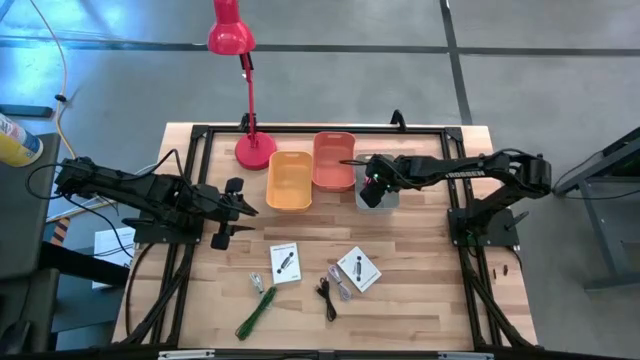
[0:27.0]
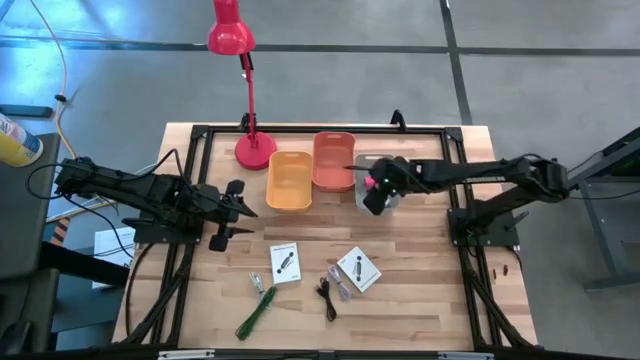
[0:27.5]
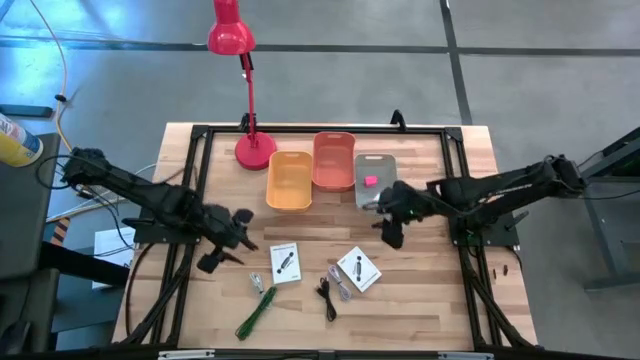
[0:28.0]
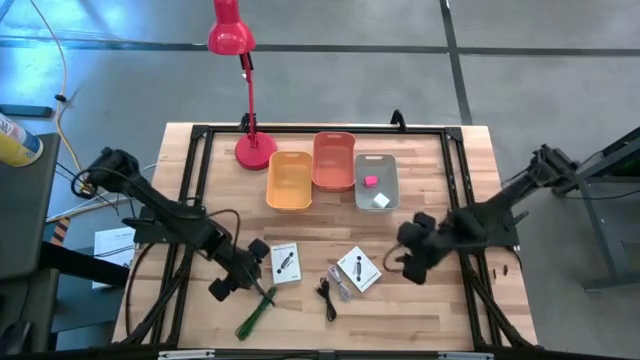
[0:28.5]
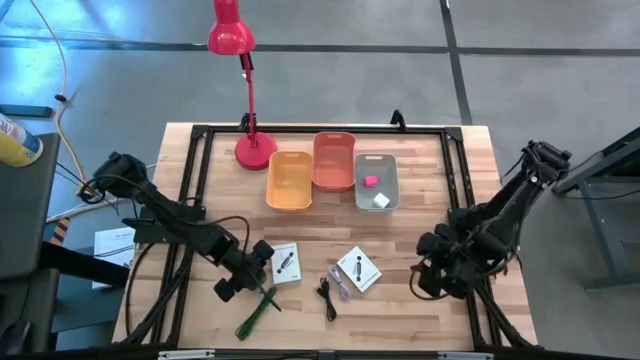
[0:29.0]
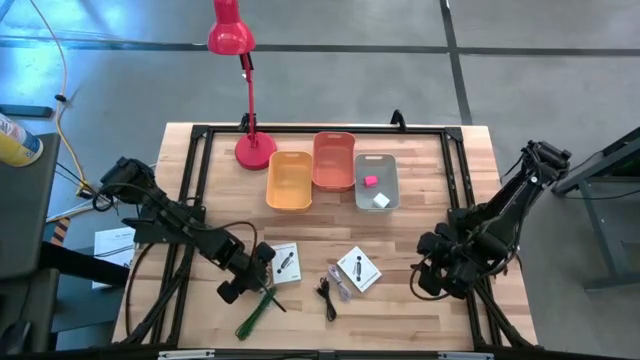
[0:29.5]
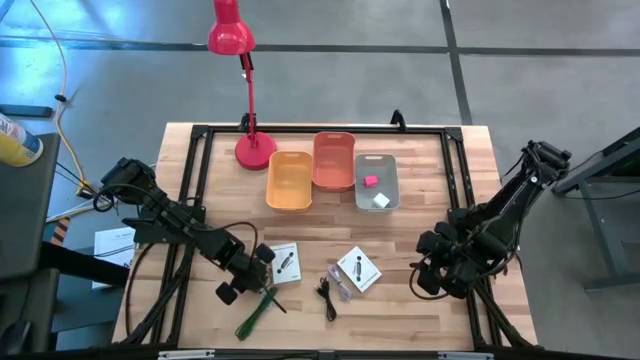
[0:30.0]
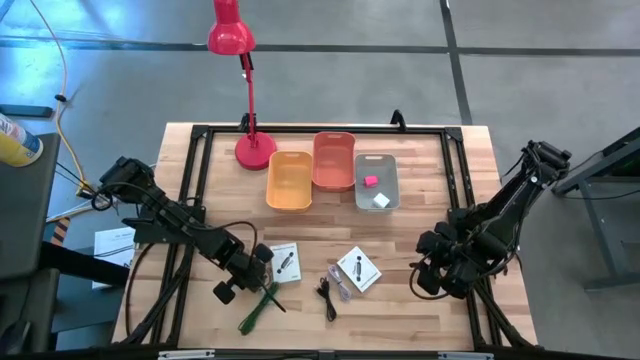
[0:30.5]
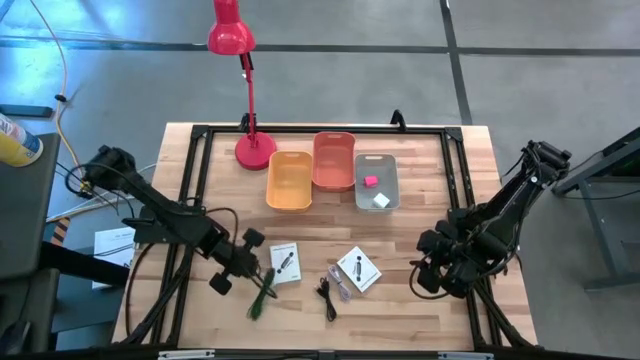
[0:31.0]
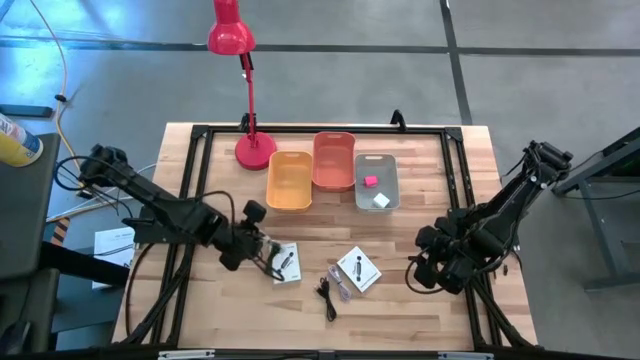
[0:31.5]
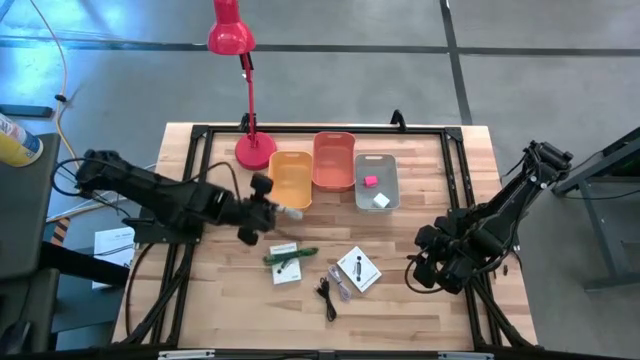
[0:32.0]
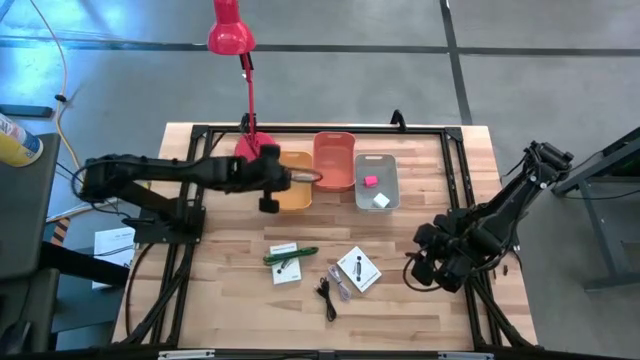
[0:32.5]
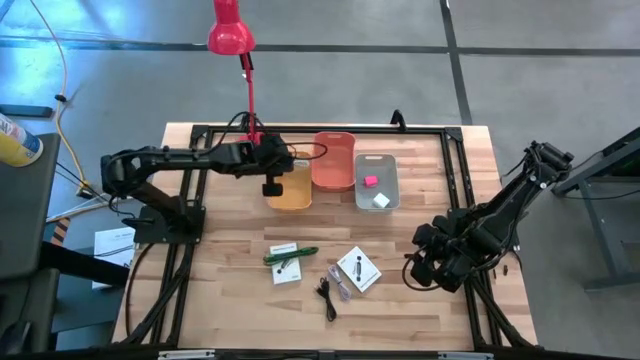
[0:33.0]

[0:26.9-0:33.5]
Task: Pick and place items into bin
Put the white charger cable into the yellow bin

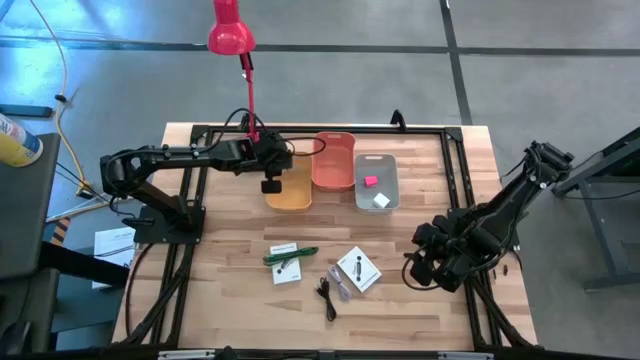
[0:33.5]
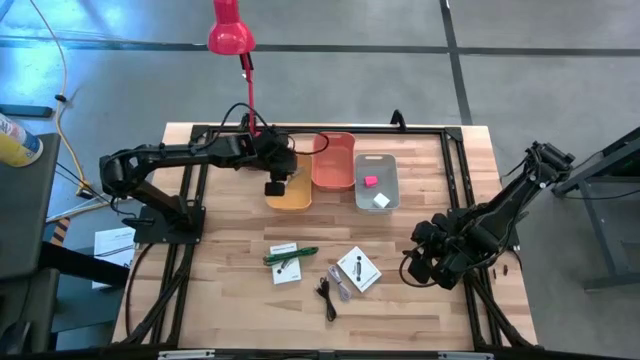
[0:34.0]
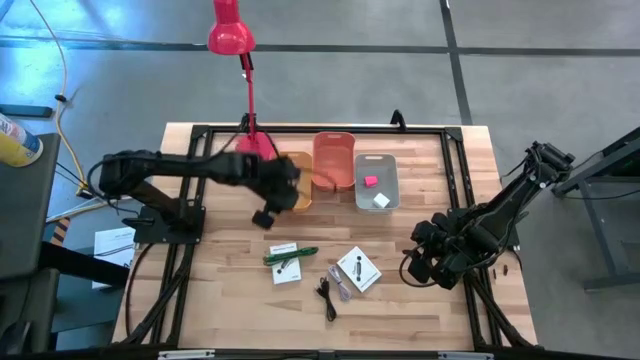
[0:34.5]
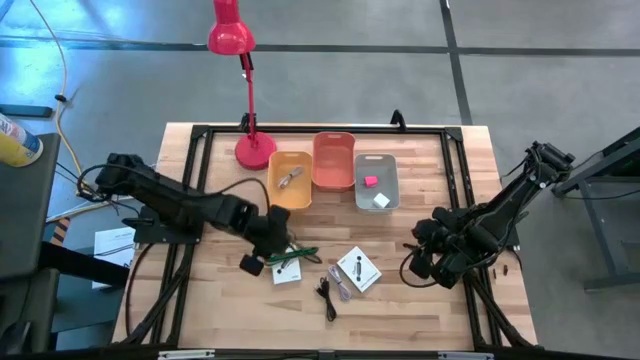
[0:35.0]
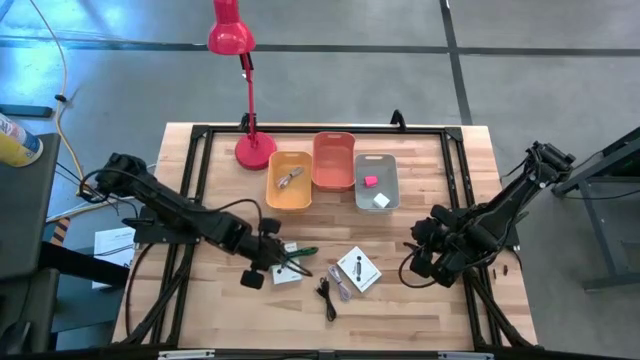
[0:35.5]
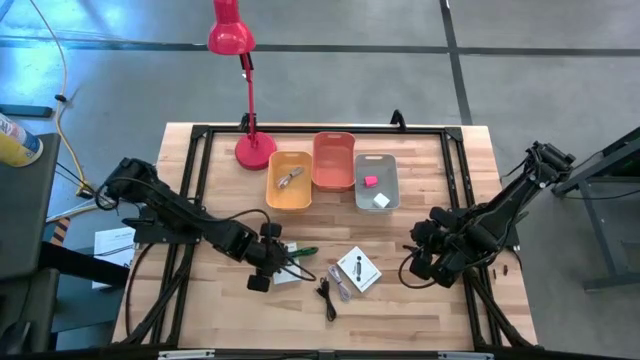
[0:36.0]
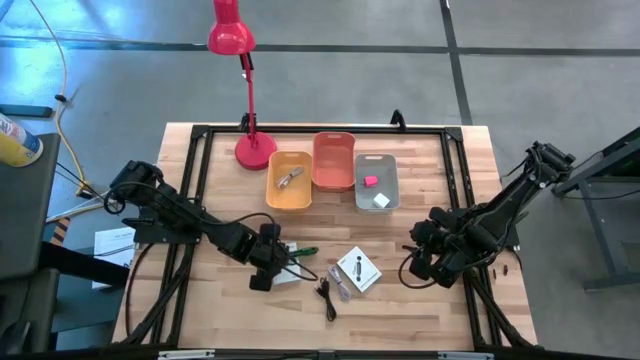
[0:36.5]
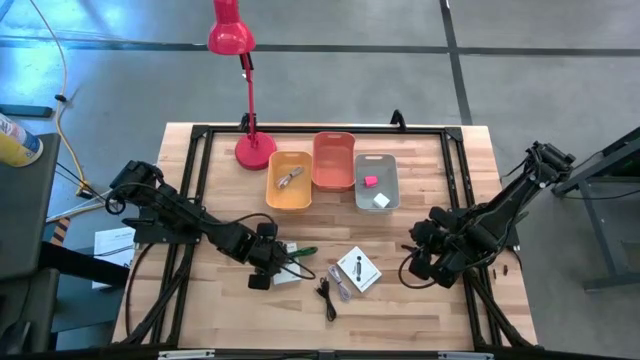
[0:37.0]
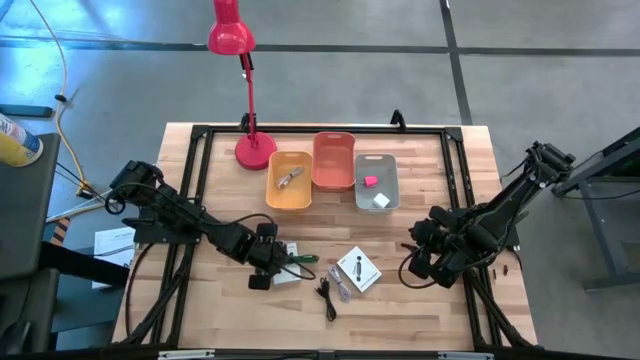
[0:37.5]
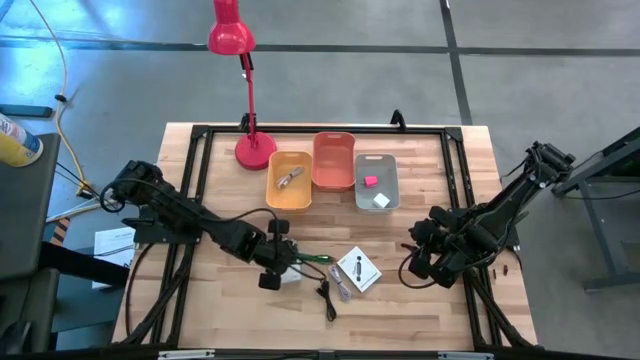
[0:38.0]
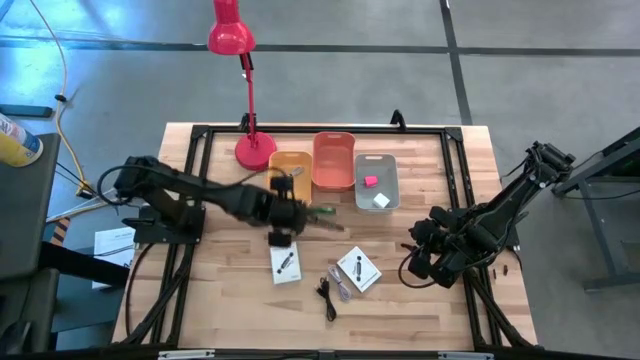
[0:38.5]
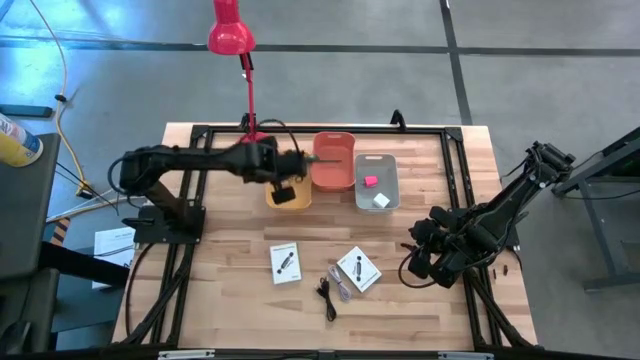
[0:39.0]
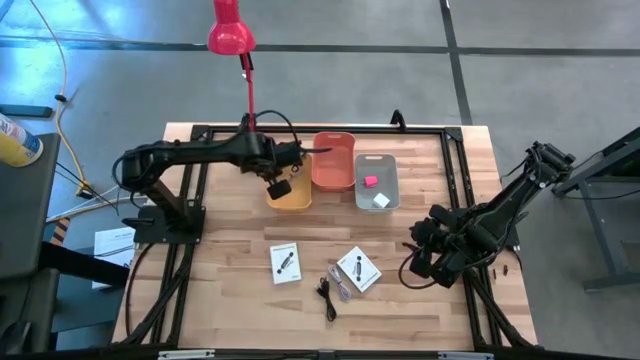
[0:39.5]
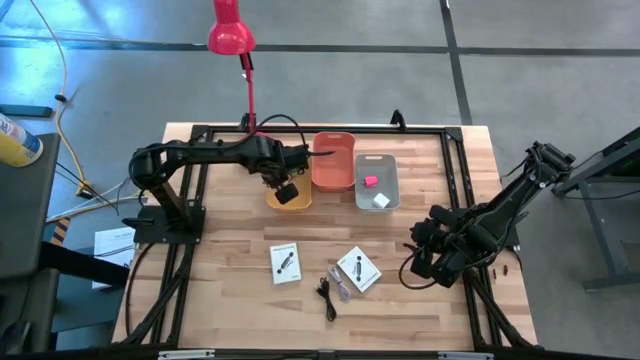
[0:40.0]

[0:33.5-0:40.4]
Put the green charger cable into the yellow bin

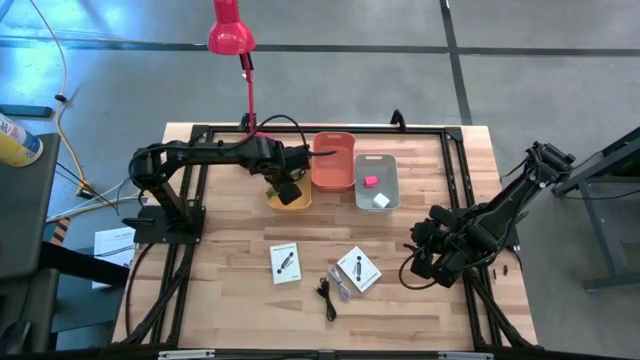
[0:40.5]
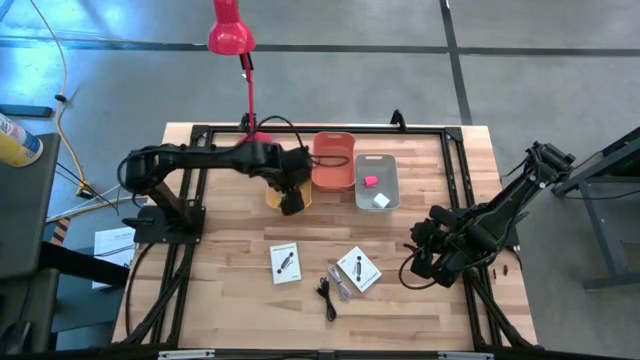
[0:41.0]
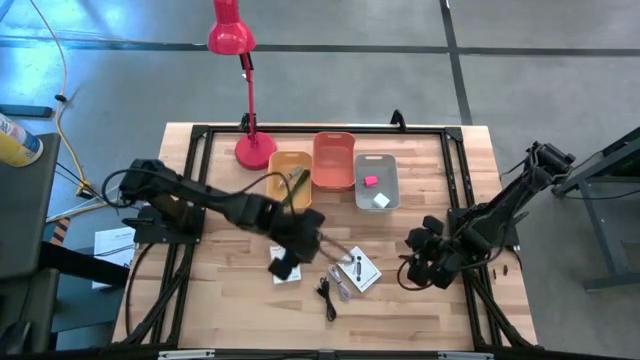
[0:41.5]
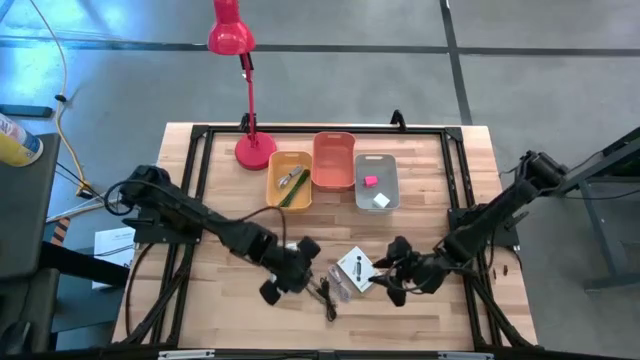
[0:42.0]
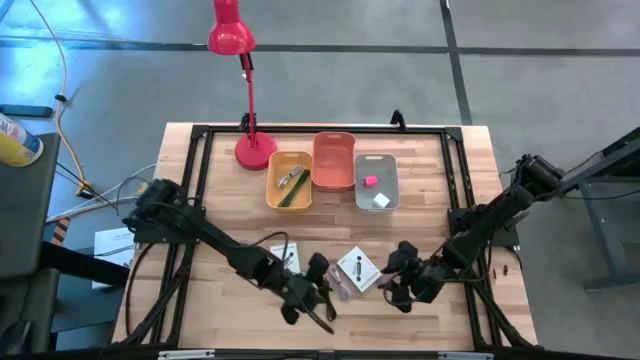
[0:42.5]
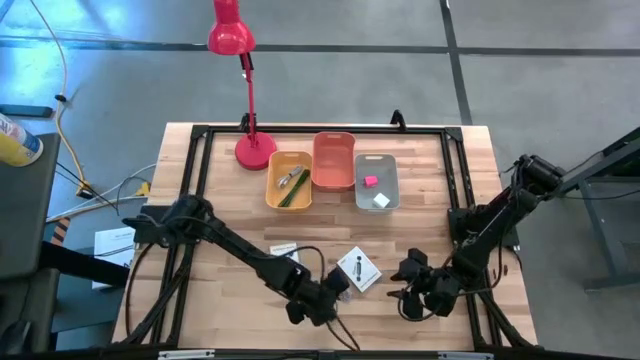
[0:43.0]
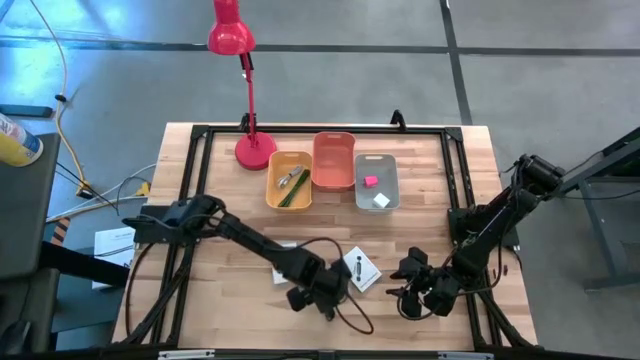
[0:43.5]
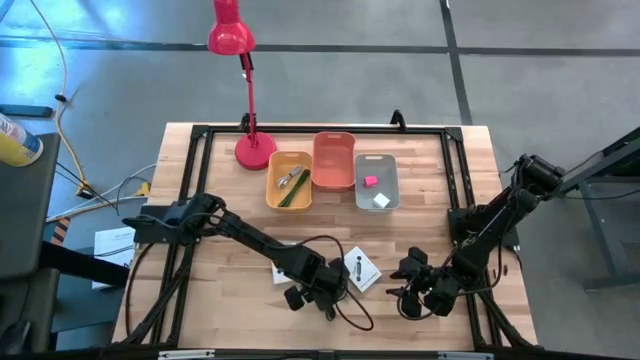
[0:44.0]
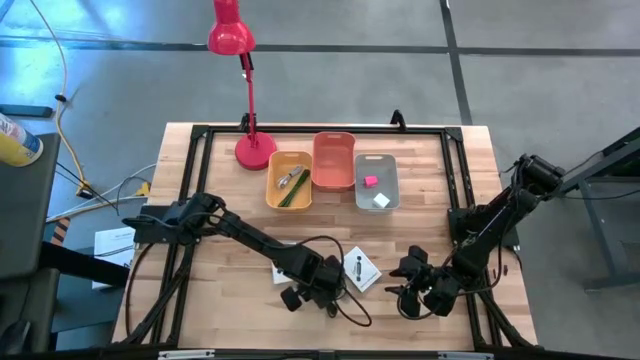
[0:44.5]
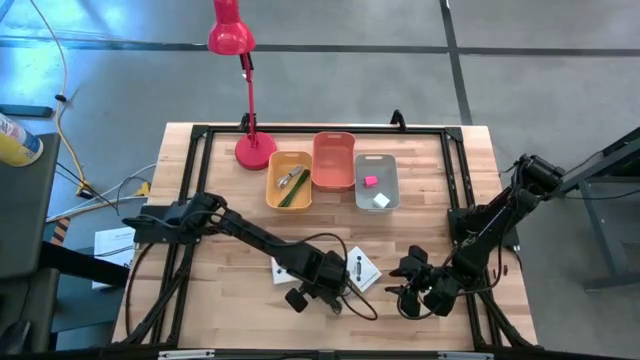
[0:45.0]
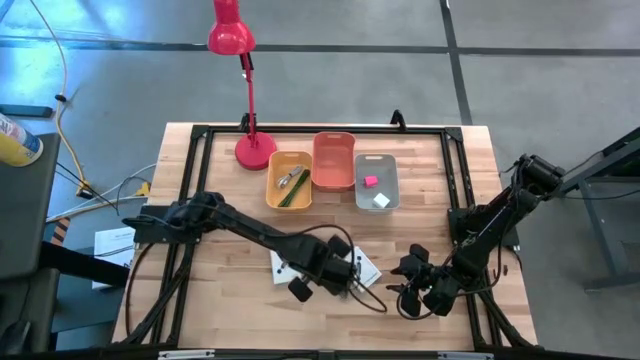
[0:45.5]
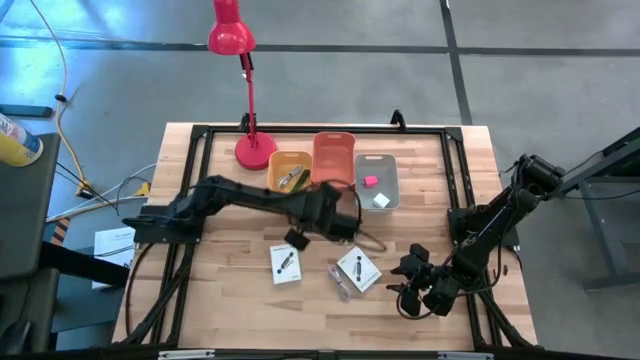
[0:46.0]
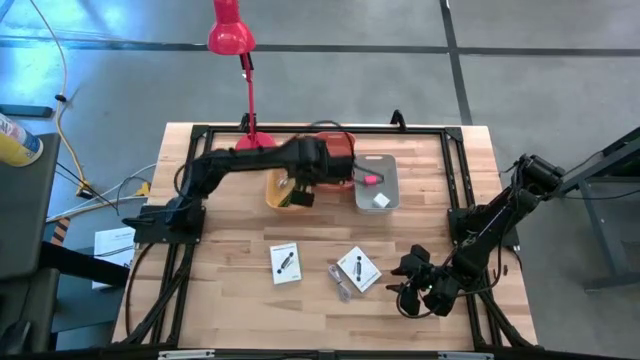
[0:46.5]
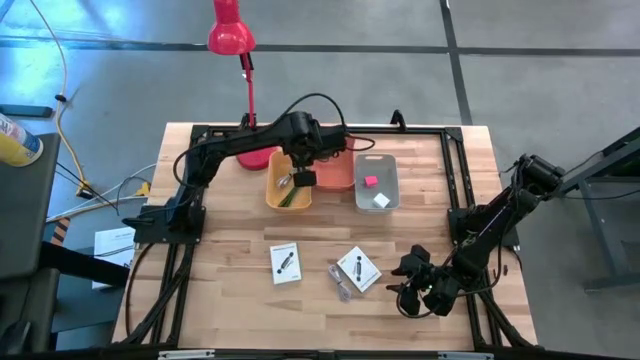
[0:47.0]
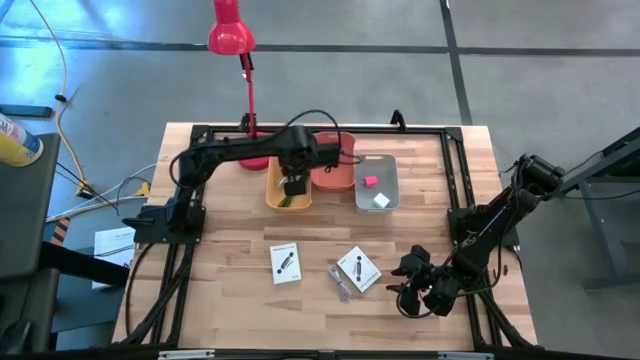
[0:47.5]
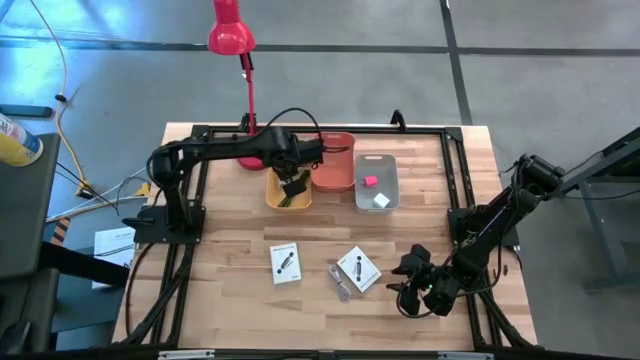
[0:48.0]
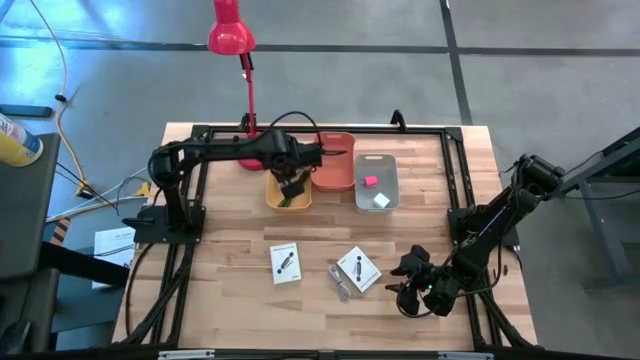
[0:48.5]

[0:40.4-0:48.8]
Put the black charger cable into the yellow bin
